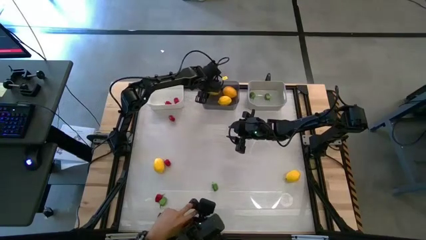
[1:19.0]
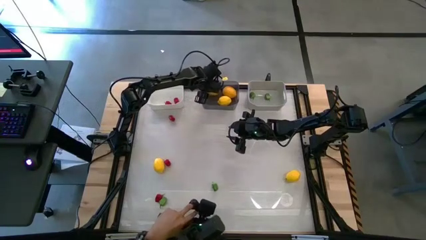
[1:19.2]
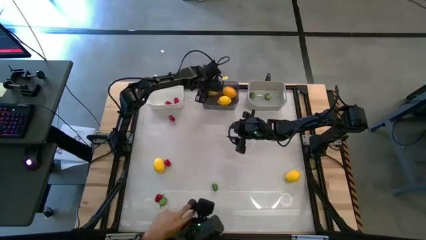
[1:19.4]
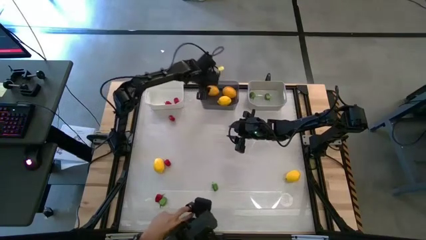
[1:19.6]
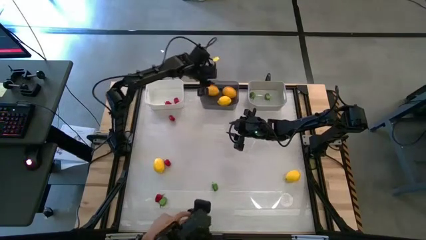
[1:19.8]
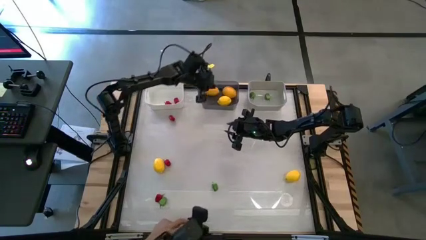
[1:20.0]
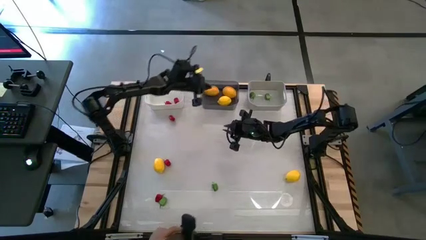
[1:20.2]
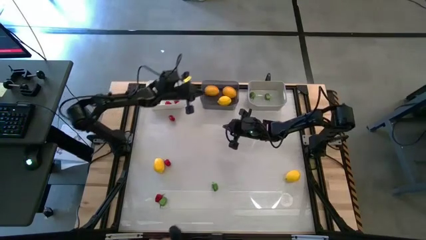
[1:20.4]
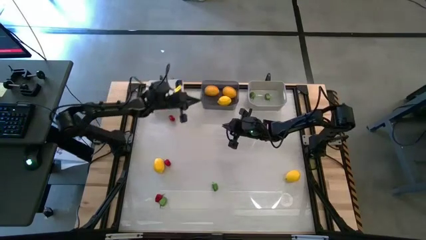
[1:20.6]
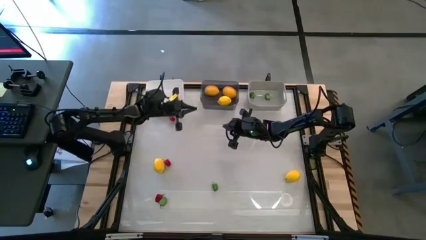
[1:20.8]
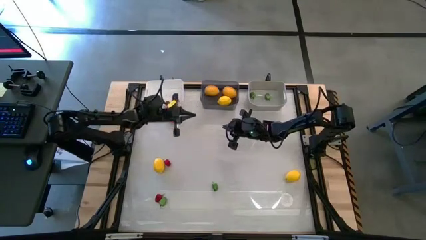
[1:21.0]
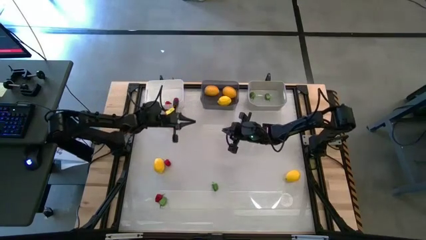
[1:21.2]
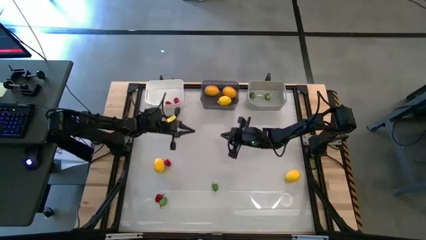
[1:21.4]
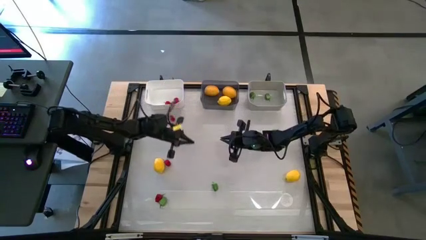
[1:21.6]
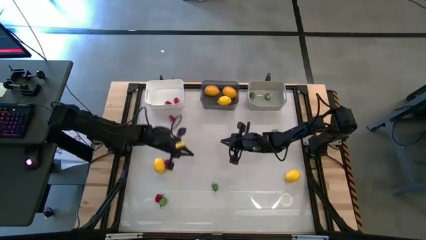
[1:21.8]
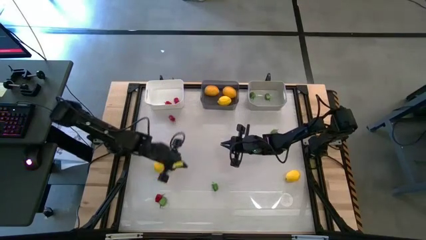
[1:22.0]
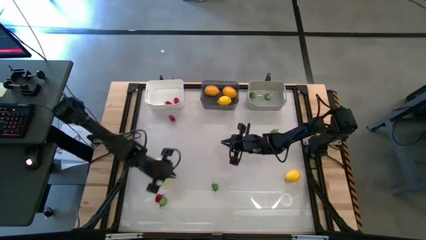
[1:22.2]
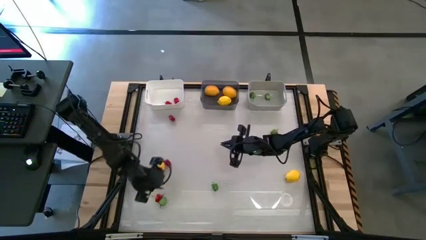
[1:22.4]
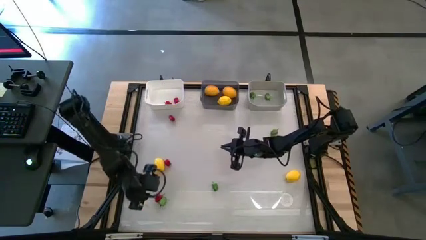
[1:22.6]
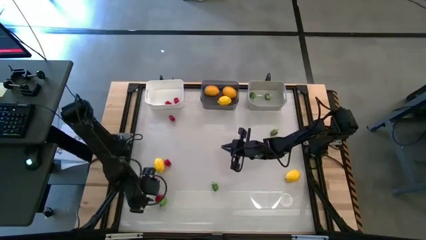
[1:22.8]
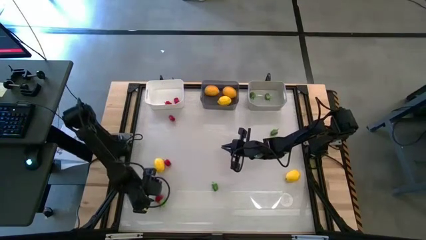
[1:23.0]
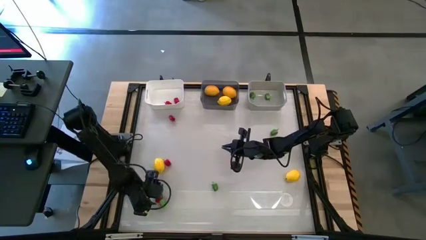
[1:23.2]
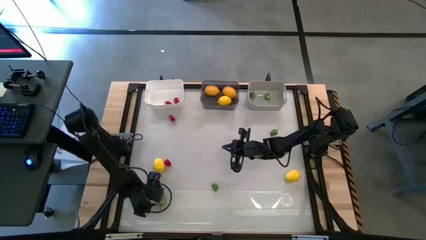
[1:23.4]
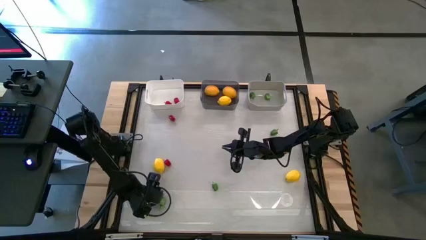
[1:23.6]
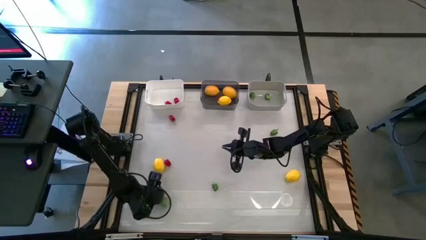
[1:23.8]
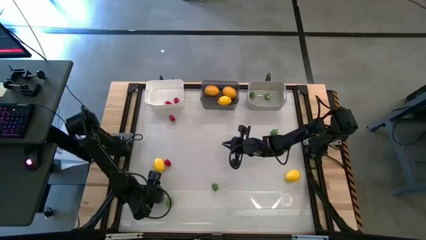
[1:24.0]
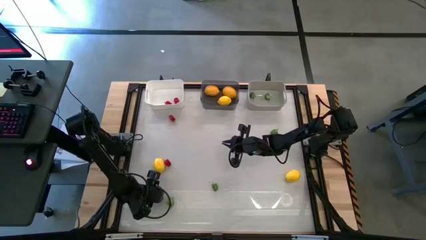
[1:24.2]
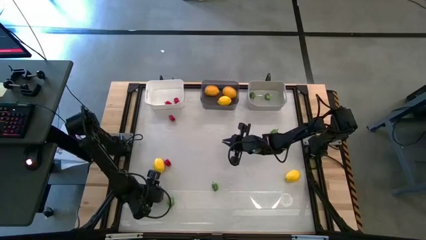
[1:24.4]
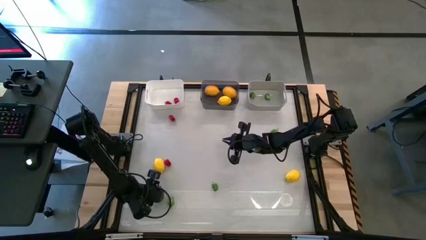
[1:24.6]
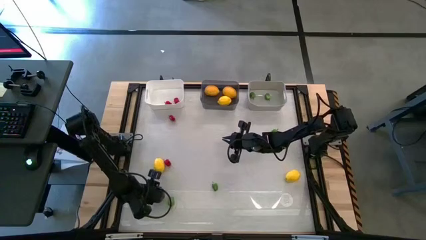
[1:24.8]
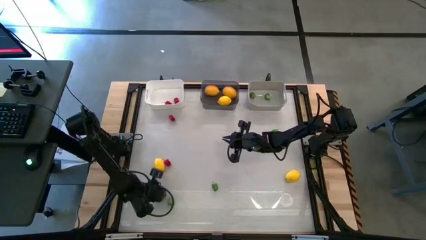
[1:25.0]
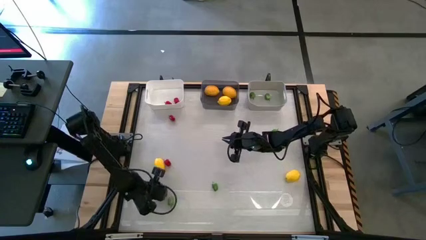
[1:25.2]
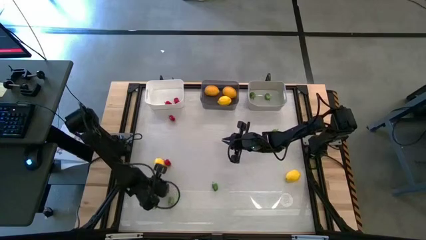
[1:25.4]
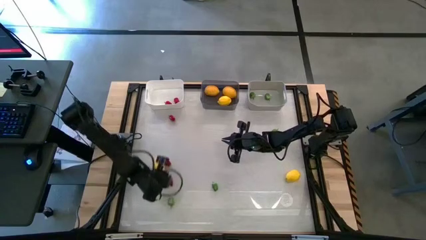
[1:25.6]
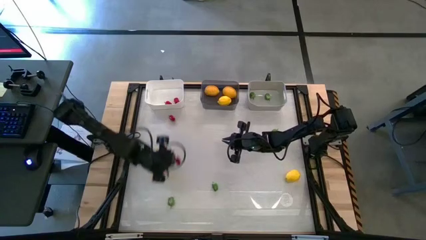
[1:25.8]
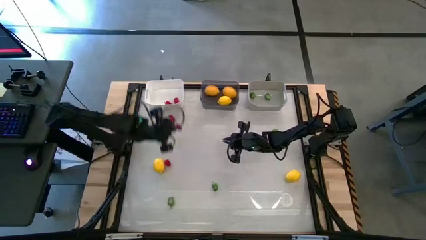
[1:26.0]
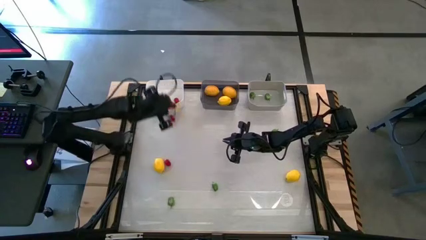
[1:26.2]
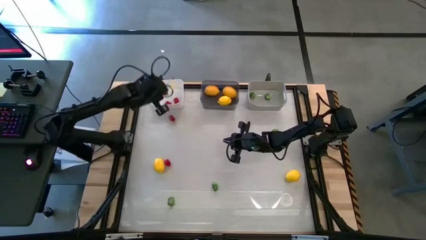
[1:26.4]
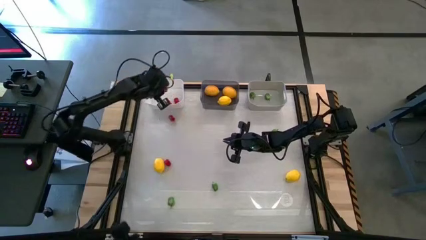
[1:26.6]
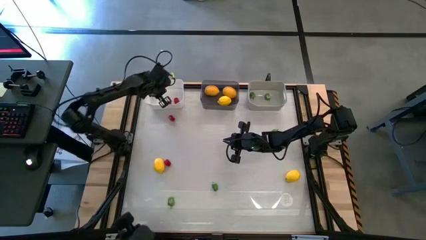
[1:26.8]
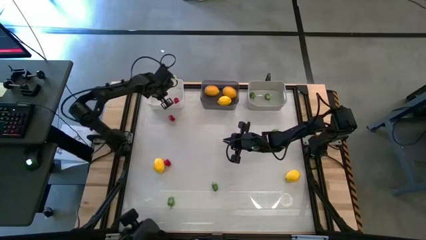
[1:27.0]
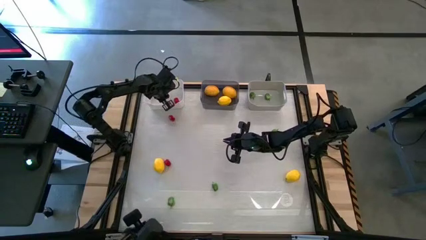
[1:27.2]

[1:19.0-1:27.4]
Task: Sort produce into baskets
Put the red bell pepper into the white bin

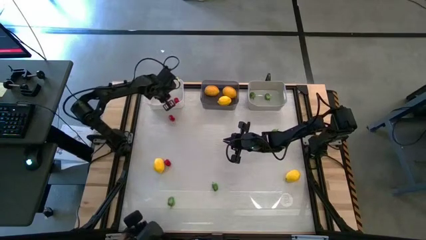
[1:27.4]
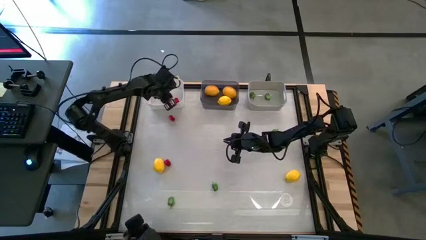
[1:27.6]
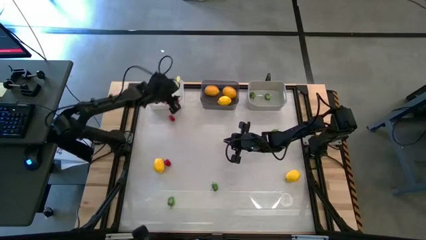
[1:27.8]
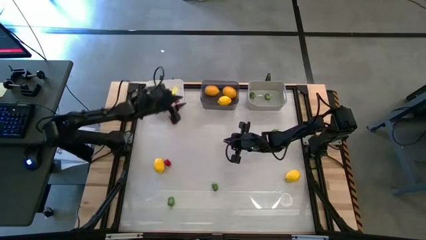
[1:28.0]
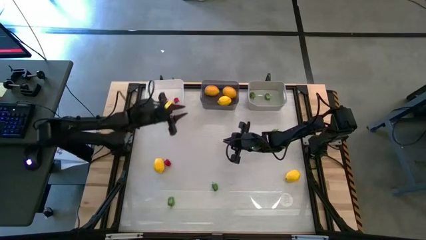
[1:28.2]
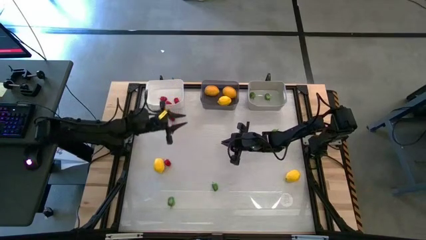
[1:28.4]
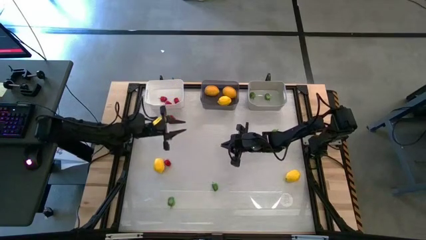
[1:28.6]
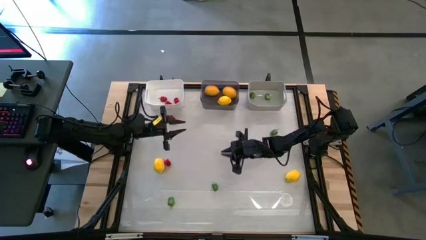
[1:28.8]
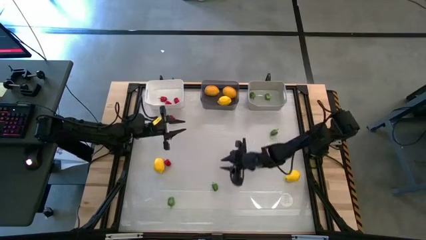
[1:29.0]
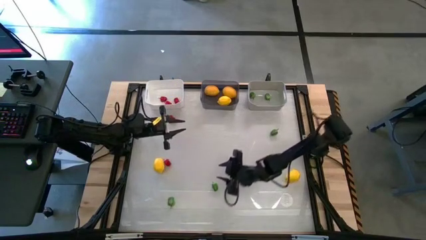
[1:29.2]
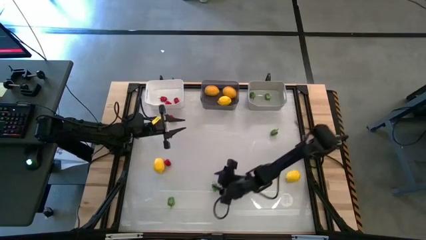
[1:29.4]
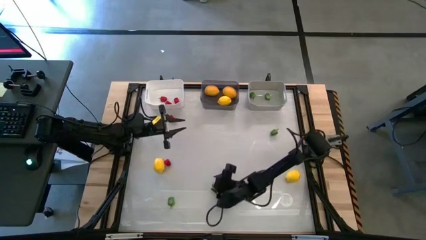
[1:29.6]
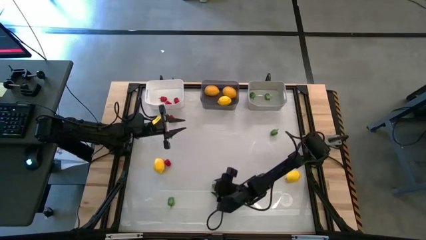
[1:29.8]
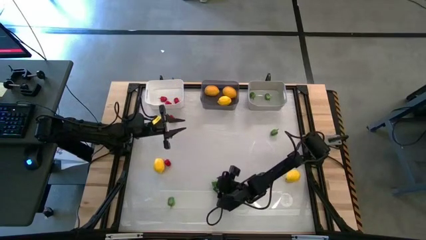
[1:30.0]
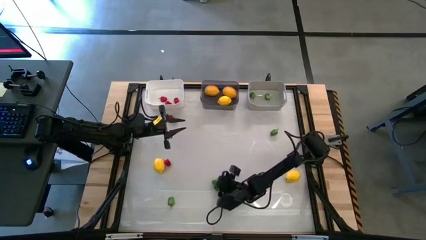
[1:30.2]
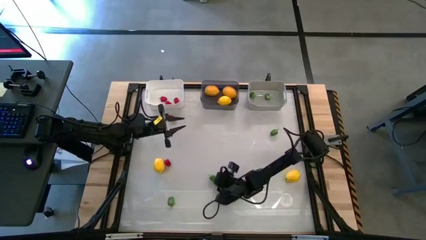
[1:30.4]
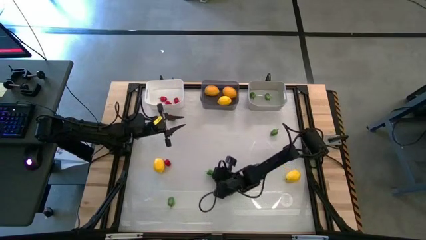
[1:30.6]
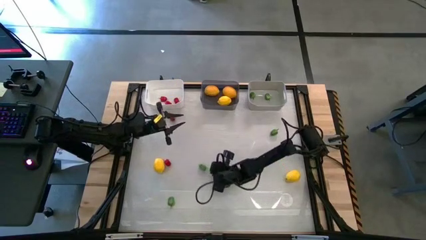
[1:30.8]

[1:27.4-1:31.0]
Put the green bell pepper into the gray bin

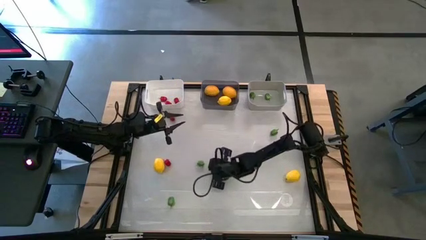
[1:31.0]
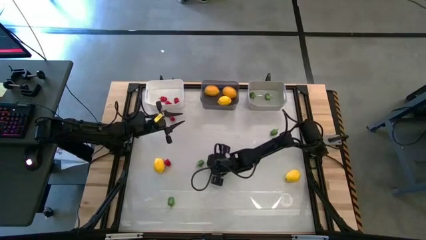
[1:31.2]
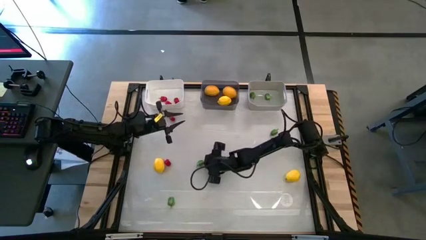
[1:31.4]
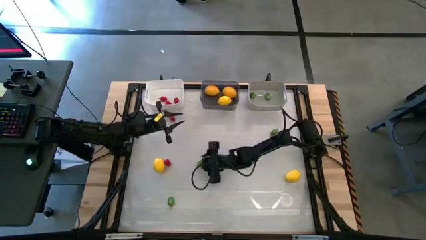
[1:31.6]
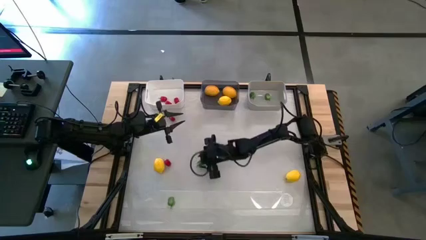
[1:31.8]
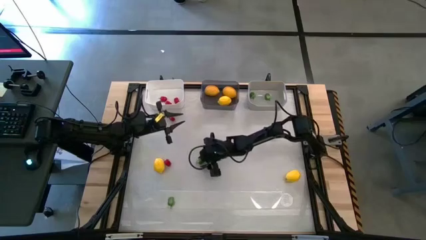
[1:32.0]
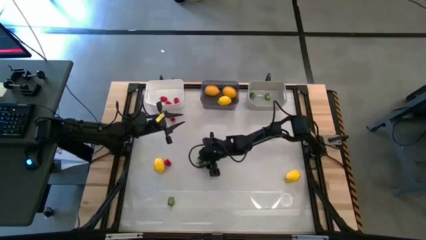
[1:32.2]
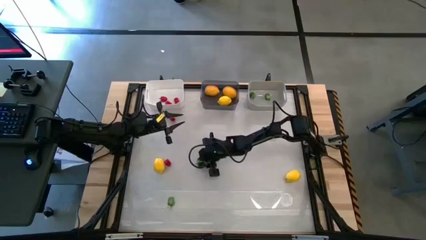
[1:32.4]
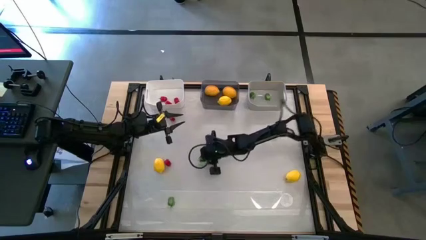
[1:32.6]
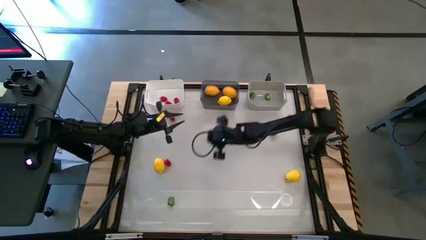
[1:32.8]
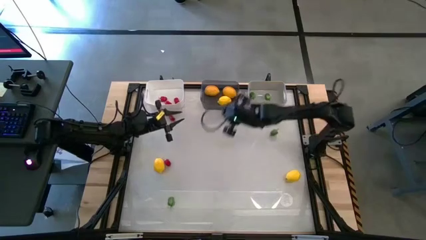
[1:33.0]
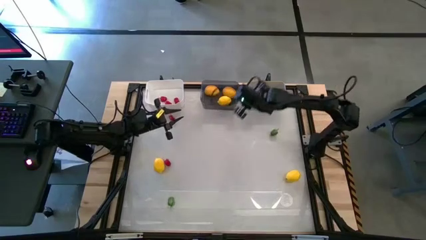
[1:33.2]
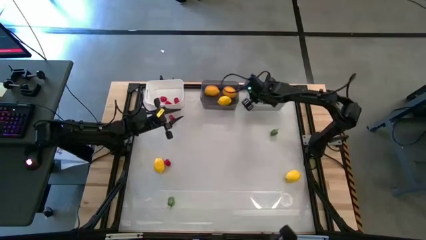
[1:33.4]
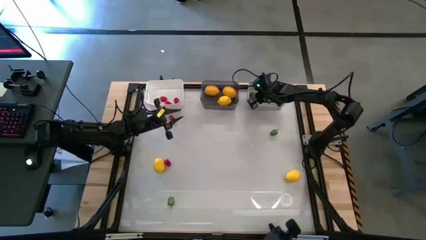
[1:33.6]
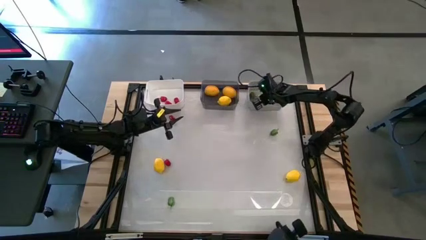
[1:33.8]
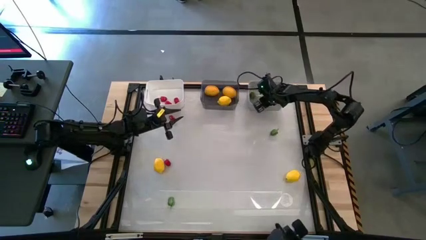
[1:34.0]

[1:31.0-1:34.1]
Put the green bell pepper into the gray bin
